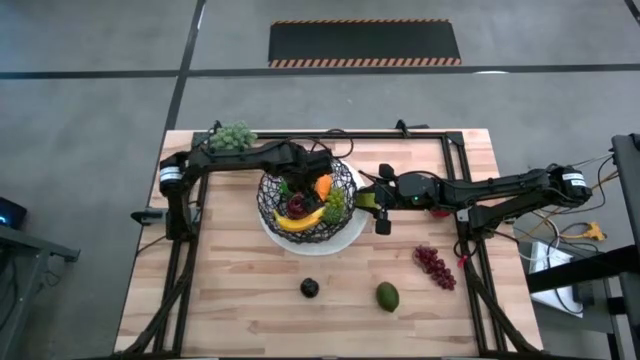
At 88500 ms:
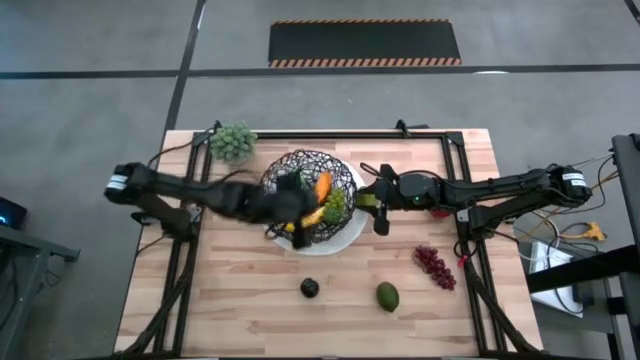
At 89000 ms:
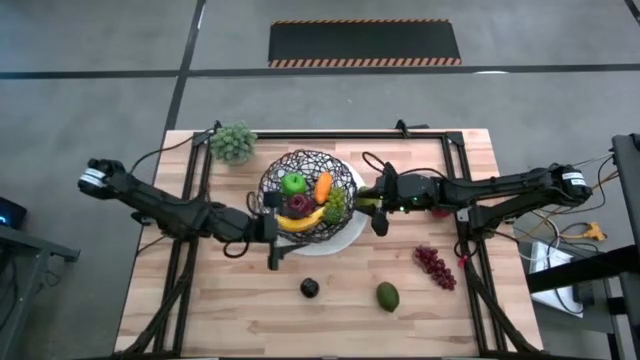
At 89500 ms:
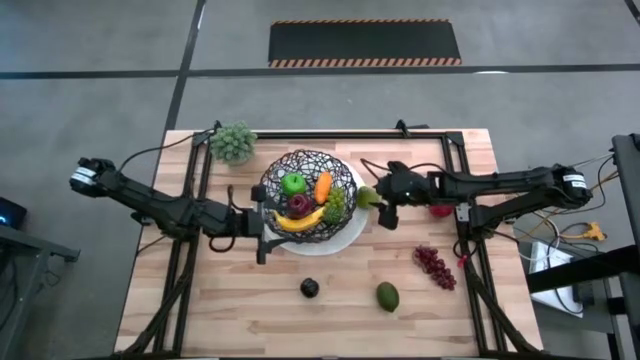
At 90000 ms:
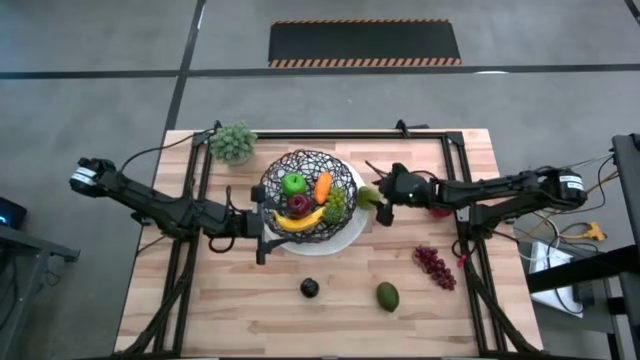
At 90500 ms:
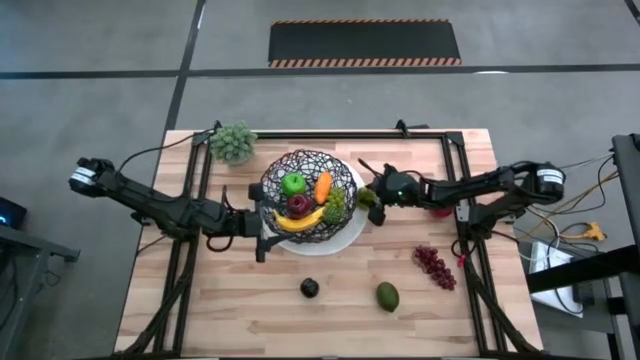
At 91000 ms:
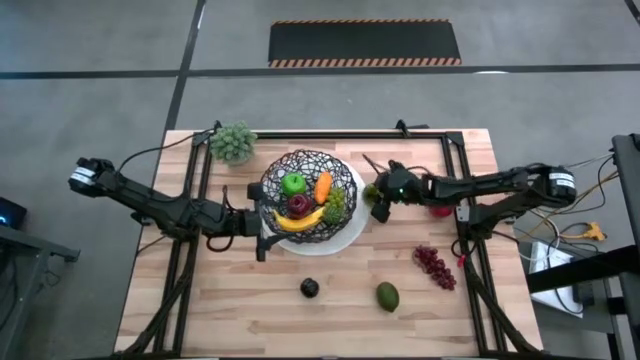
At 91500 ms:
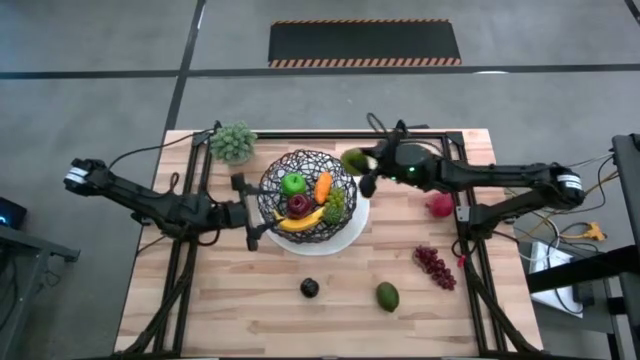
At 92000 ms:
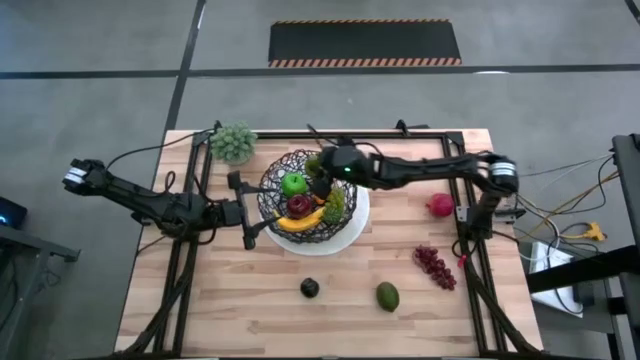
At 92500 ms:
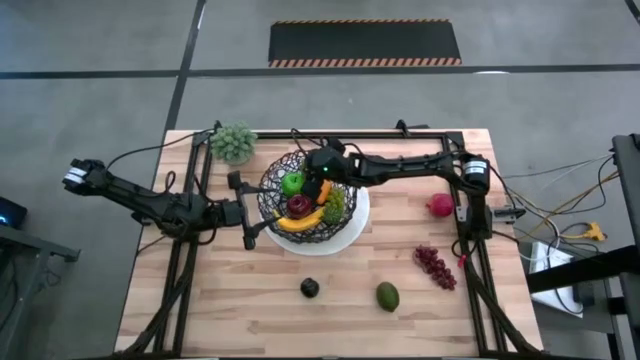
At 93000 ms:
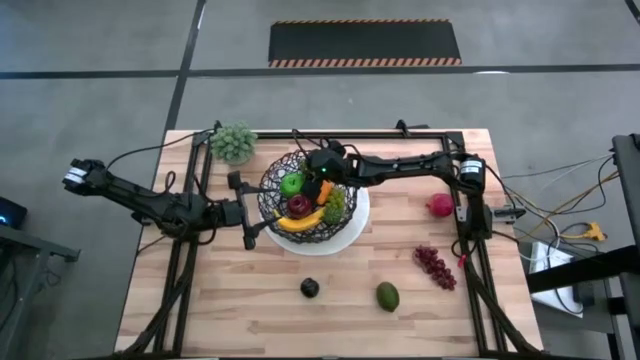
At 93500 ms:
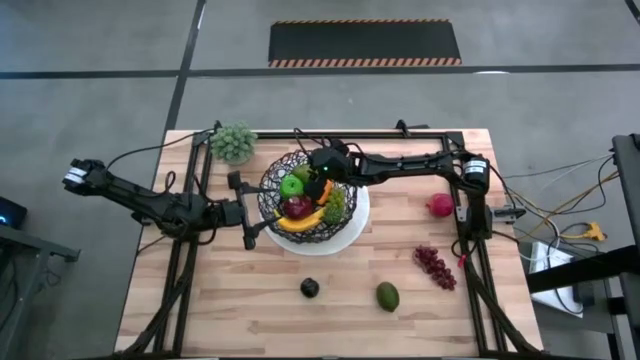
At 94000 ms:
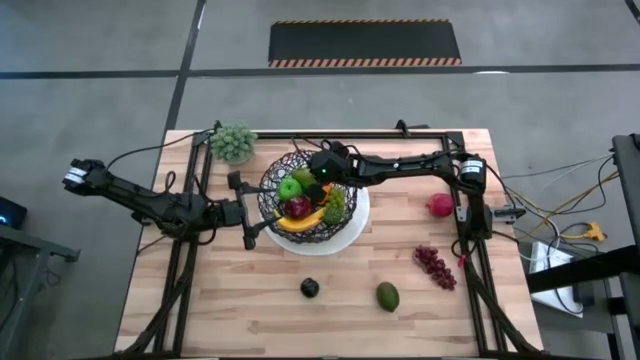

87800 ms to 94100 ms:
Task: Build produce basket
Put the pear into the wire basket

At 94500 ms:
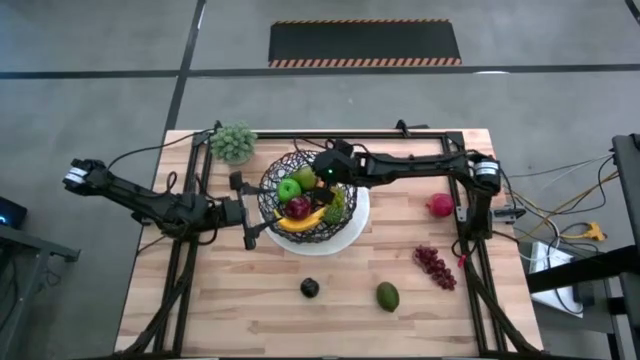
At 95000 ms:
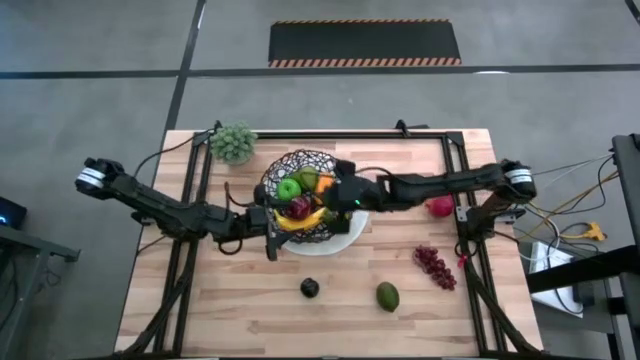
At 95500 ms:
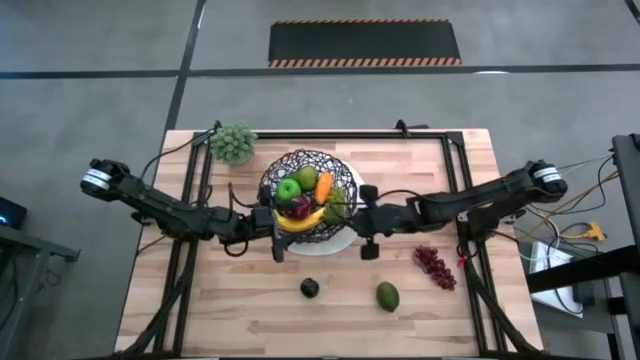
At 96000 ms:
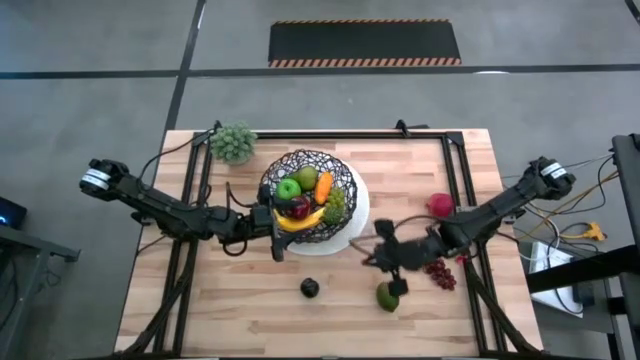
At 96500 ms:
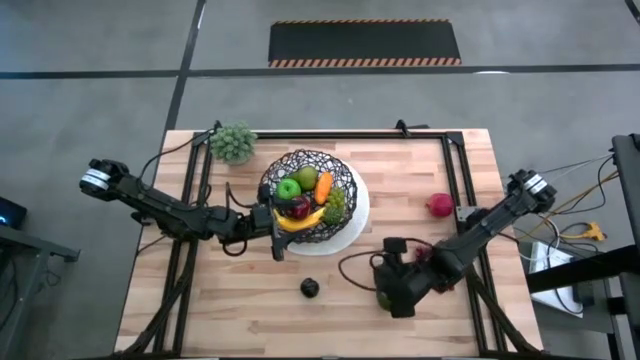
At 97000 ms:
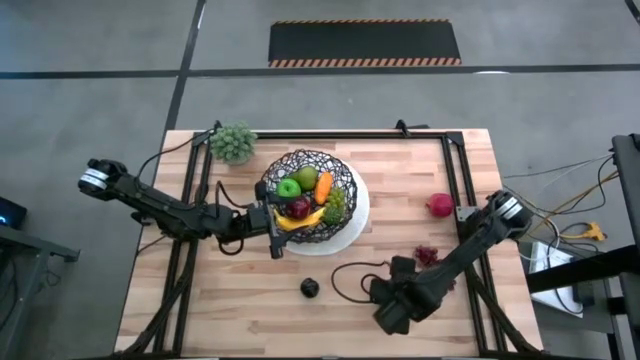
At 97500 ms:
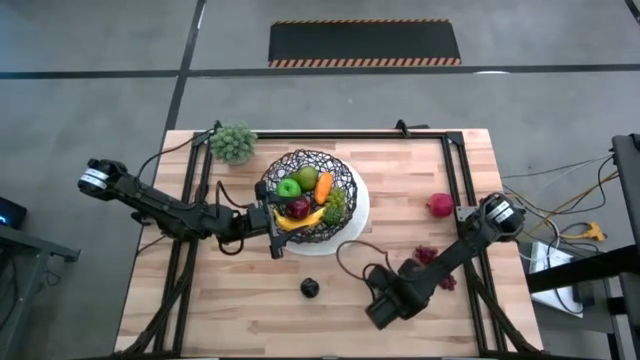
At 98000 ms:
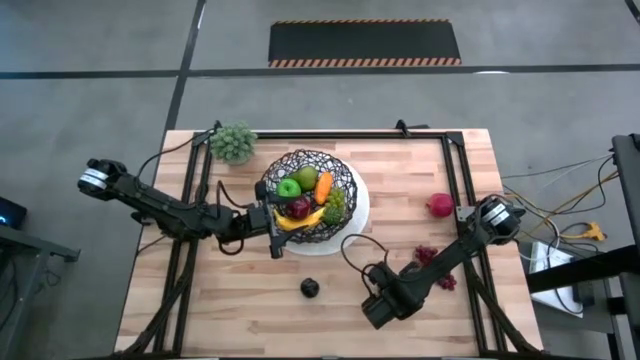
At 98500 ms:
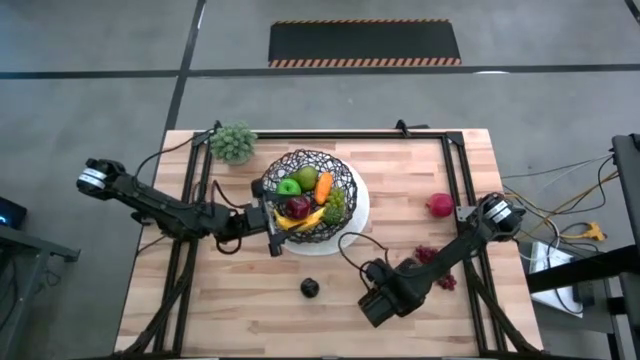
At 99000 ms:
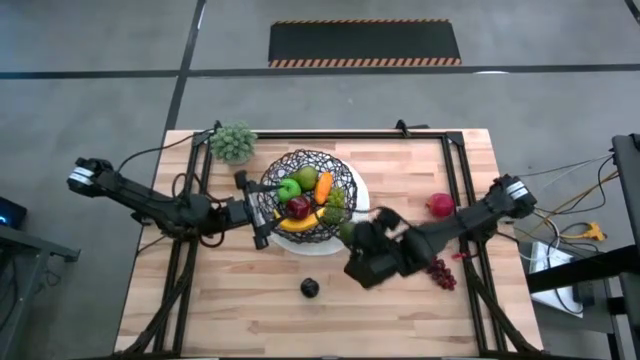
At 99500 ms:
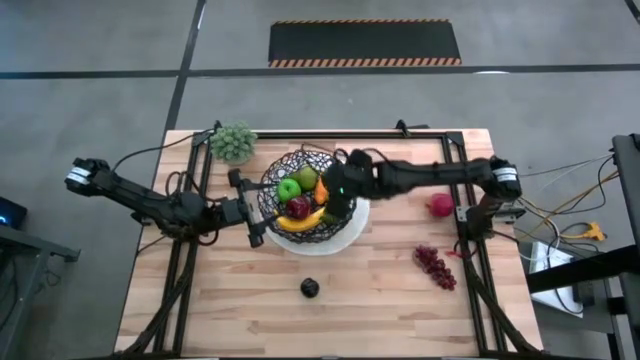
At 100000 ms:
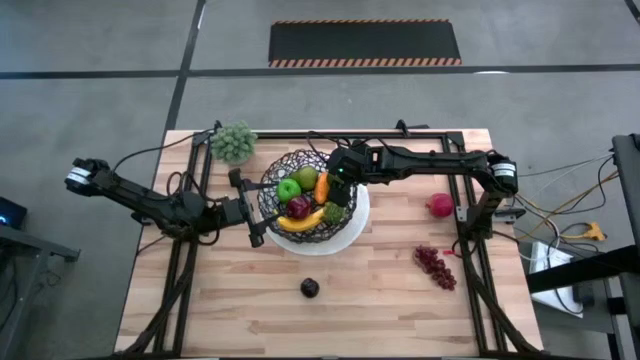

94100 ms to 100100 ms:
Put the lime into the wire basket

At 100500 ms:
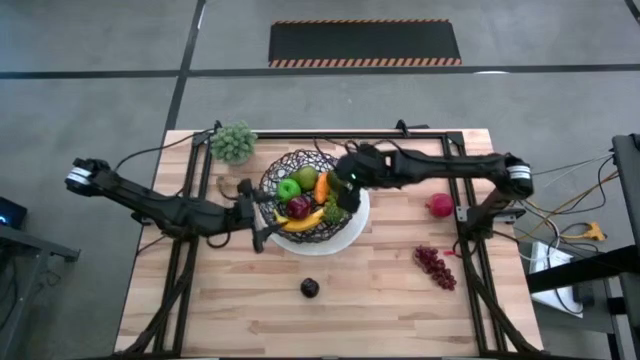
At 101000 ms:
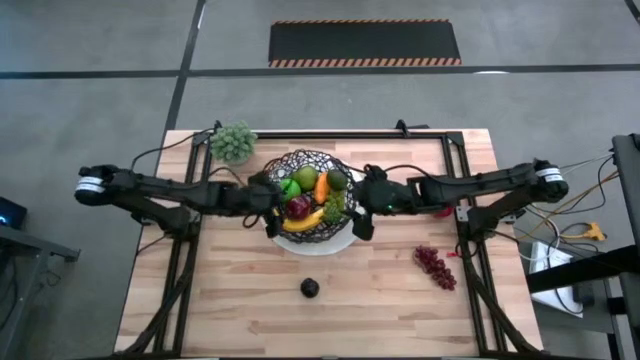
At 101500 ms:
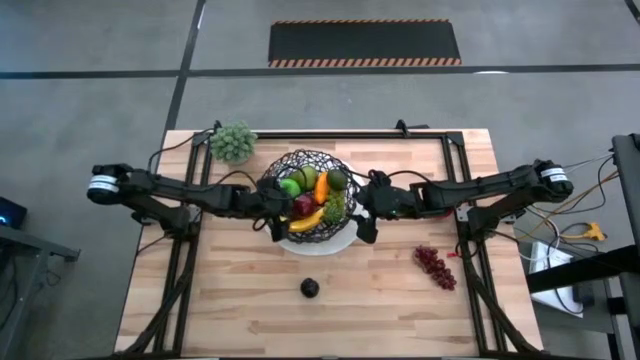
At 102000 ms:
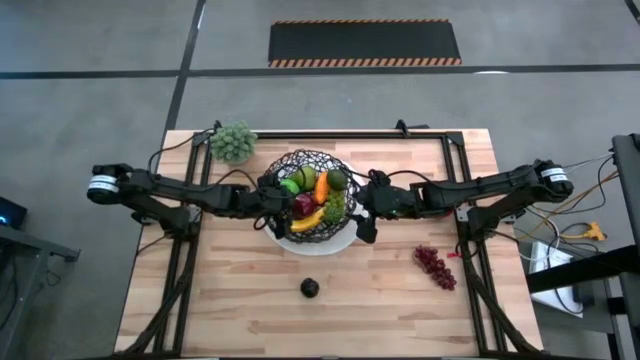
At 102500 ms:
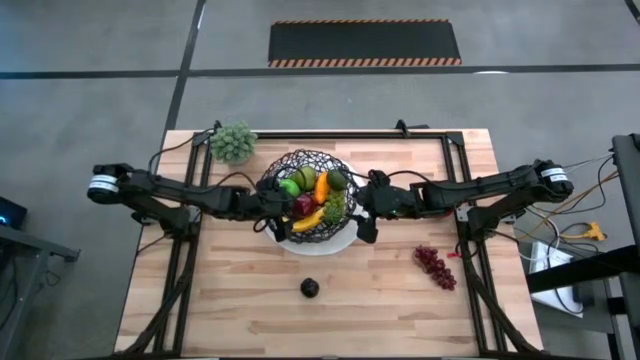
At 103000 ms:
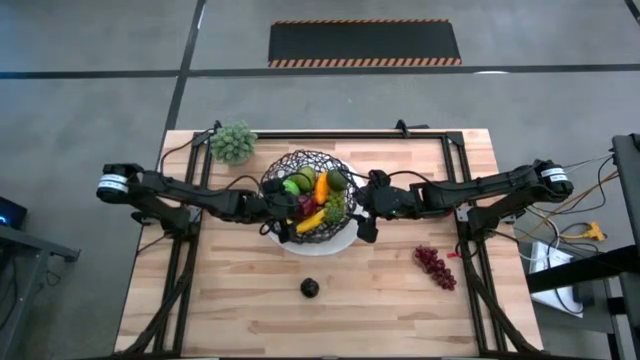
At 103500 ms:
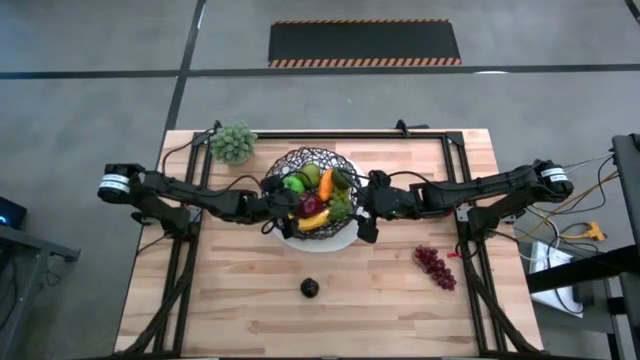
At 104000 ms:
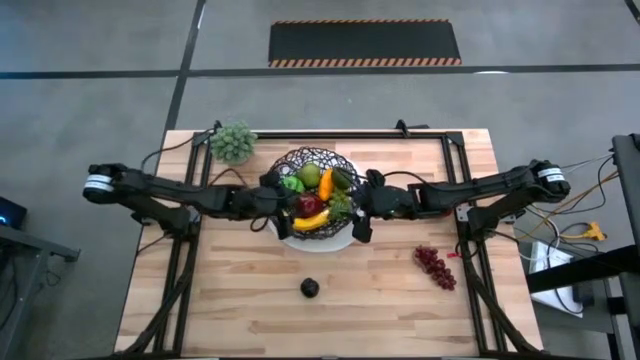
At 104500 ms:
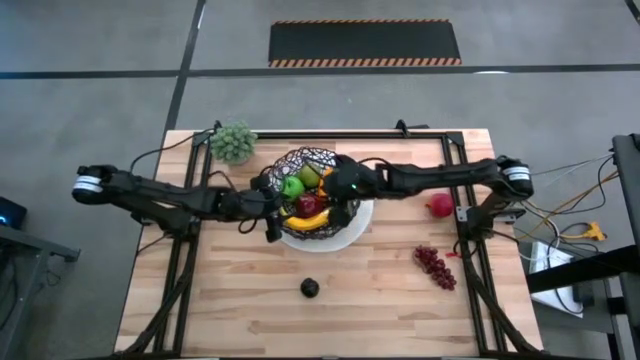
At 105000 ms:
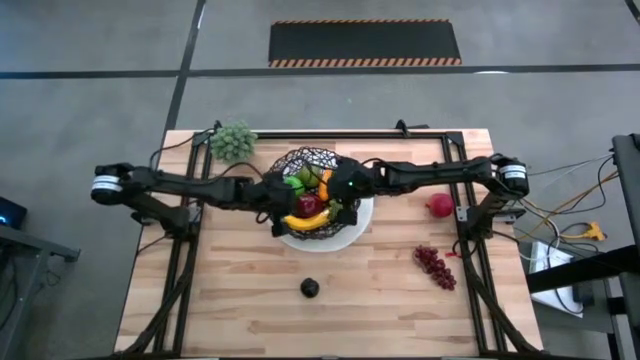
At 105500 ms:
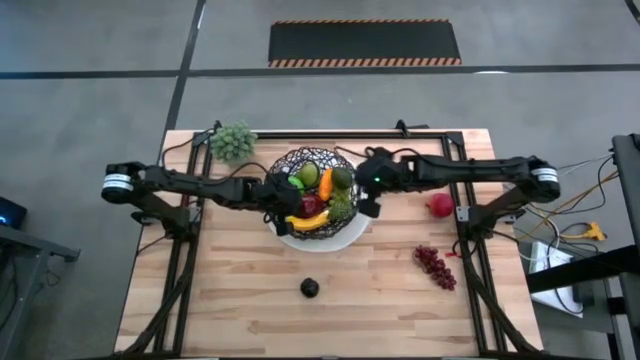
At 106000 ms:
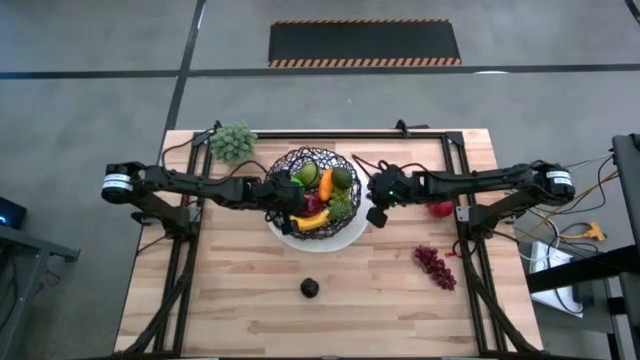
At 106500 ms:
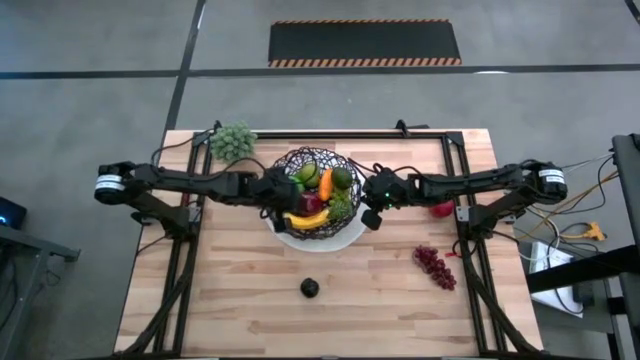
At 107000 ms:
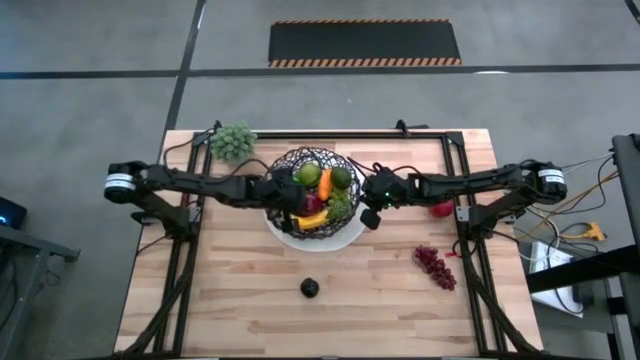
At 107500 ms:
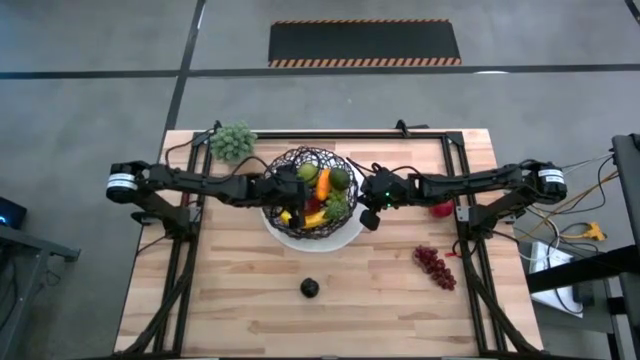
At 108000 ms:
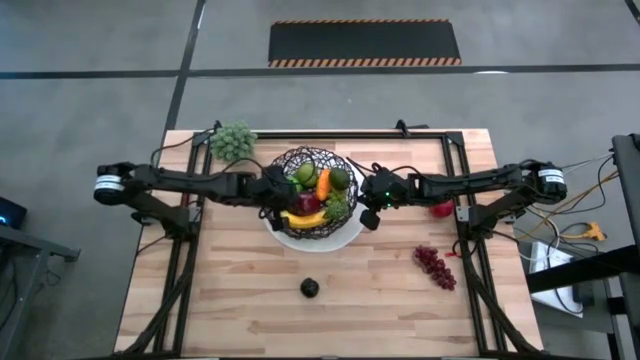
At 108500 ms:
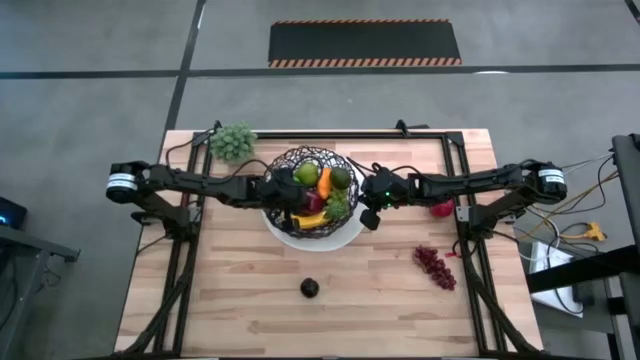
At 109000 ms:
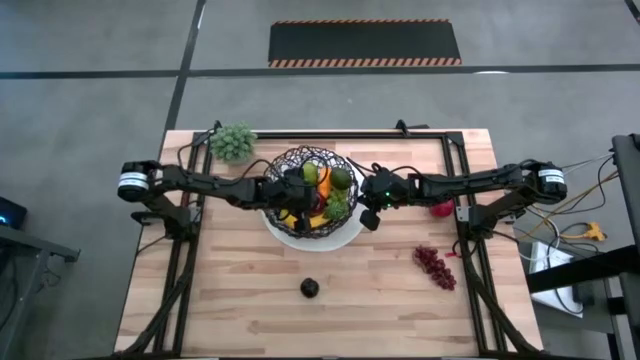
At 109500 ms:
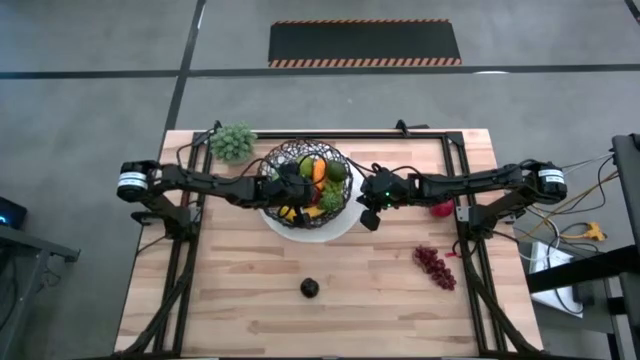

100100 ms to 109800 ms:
Adjust the red apple in the wire basket
